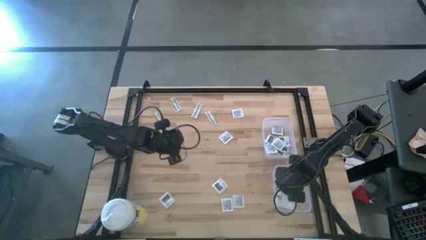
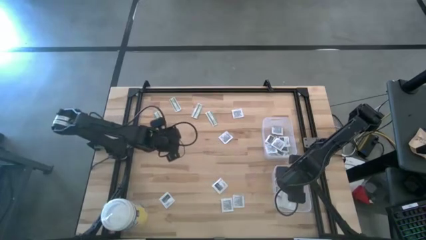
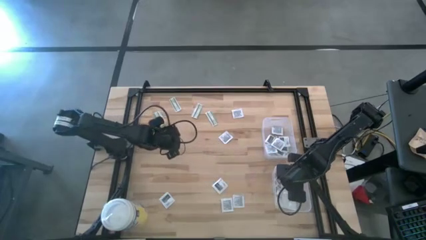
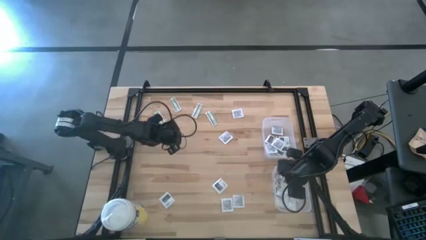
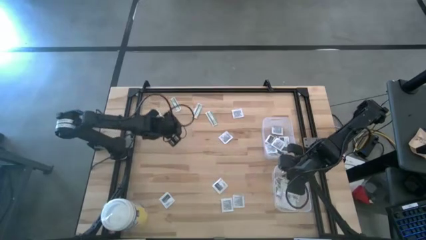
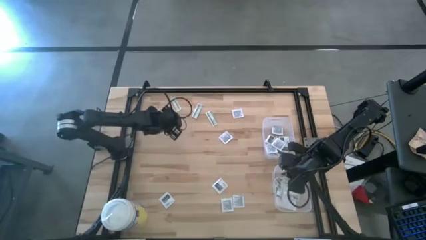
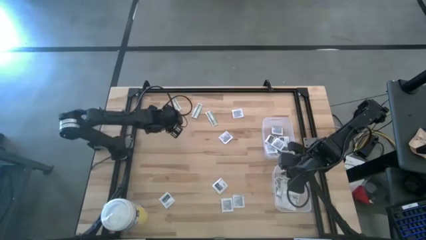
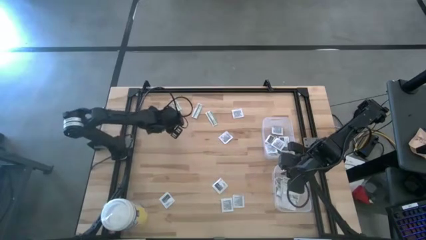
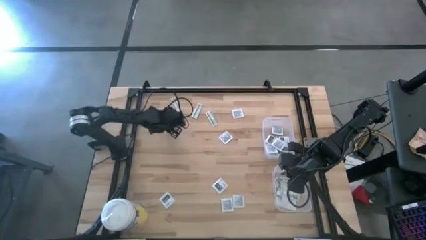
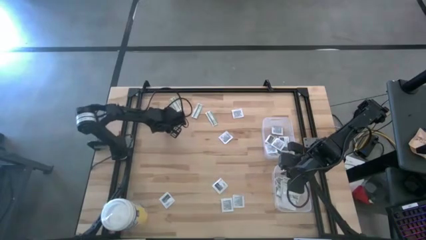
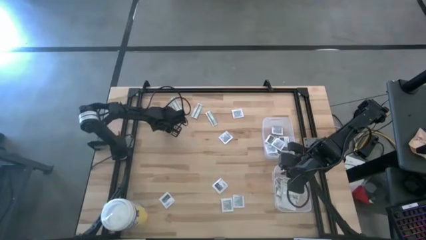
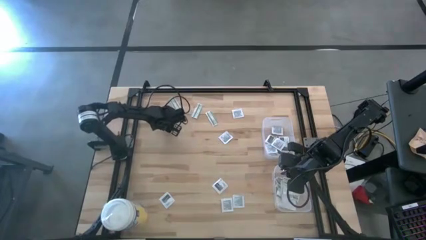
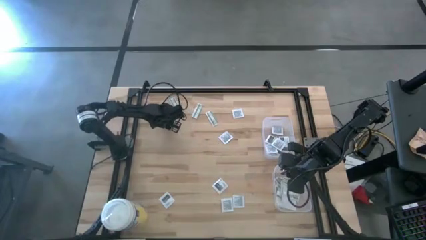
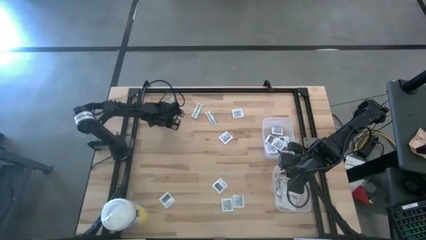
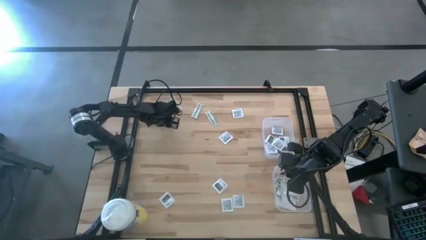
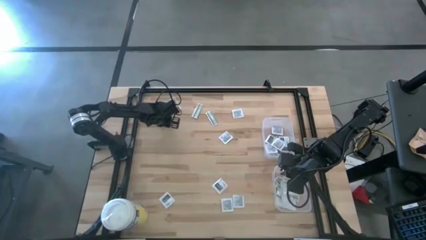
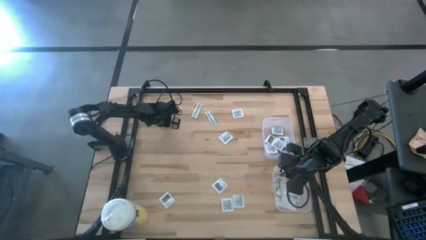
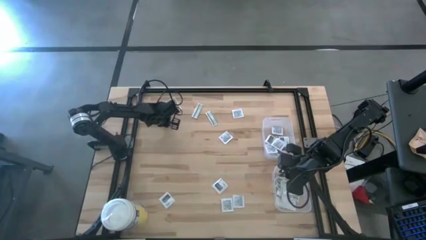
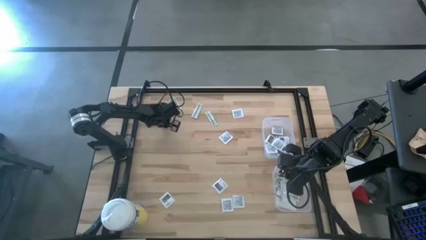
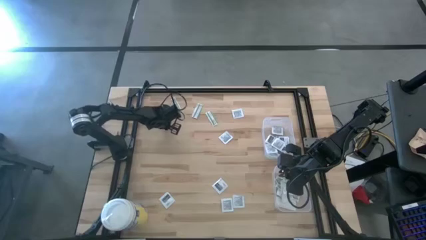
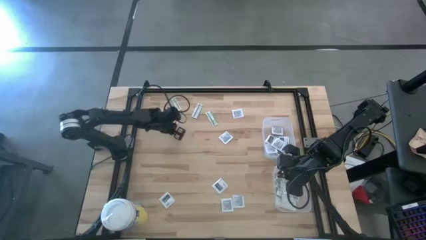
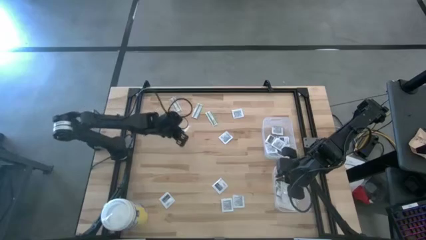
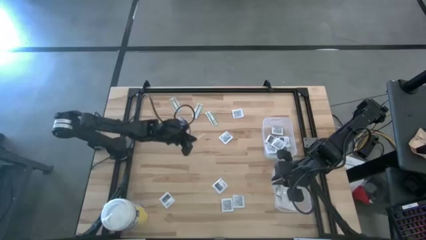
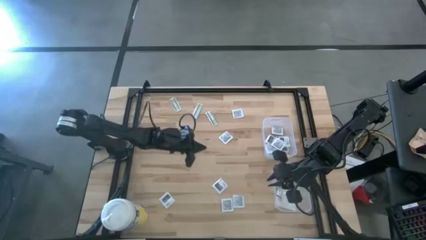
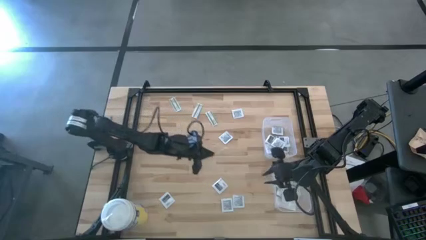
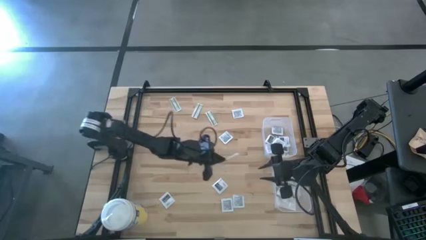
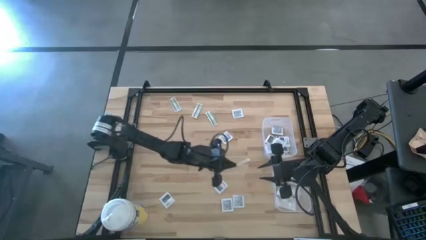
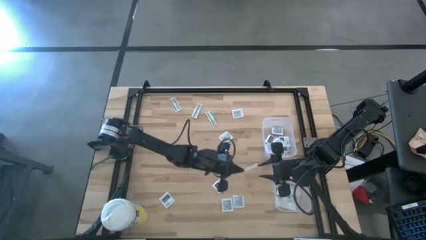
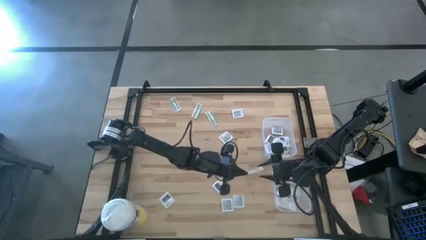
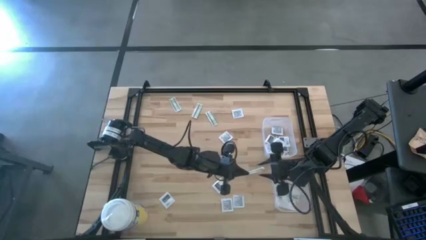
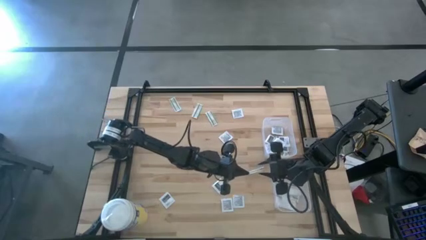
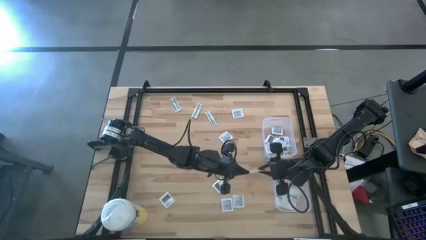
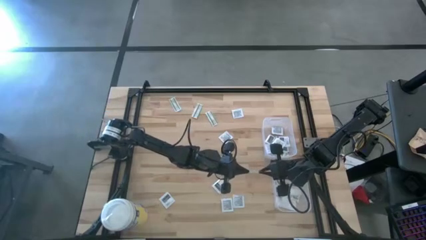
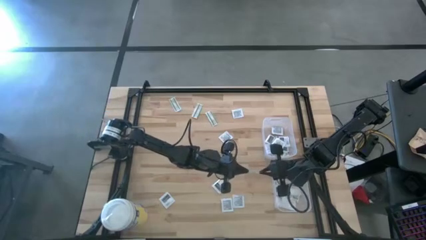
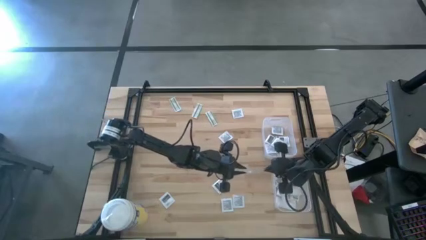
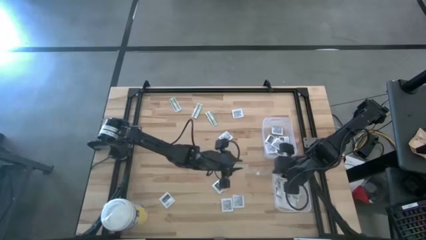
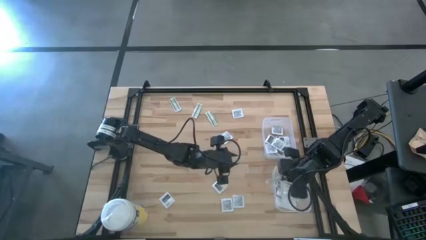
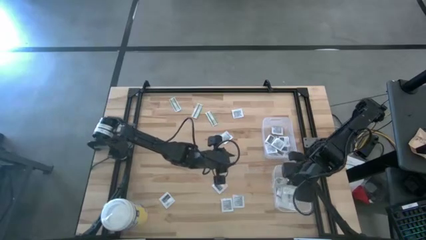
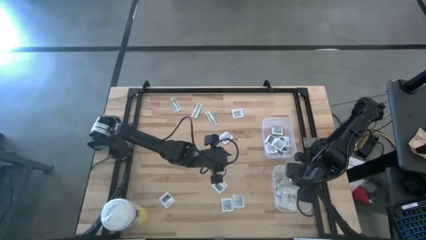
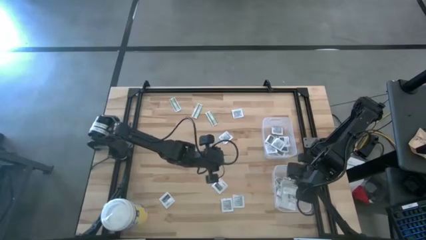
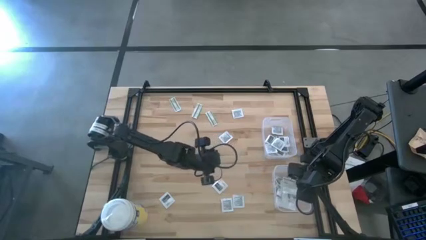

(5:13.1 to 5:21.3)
Task: Pick & Place First Aid Supplies
Put the bandage pack into the bottom bin

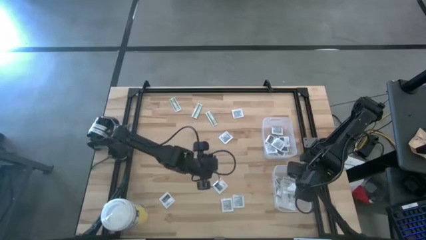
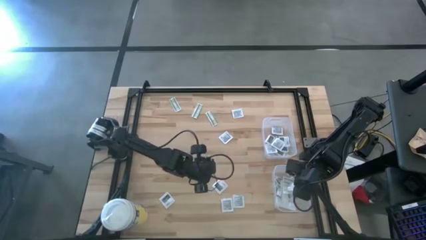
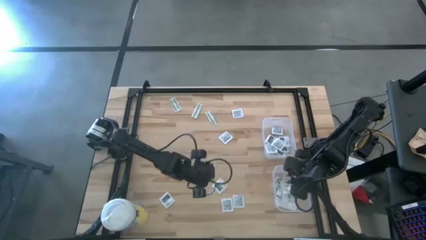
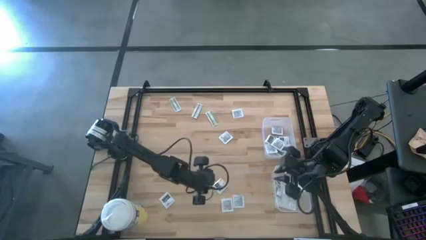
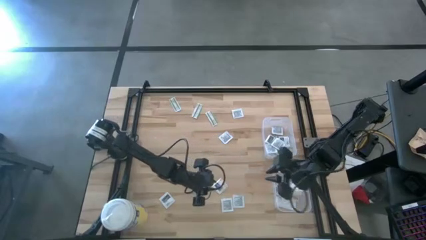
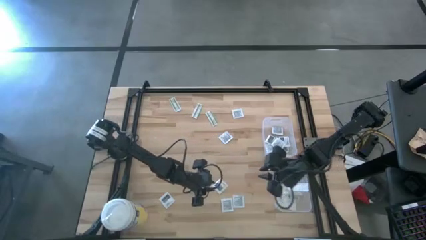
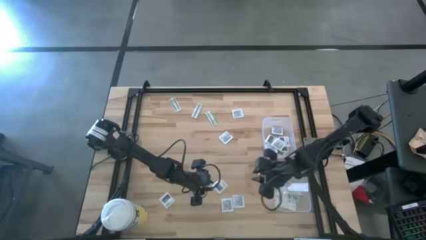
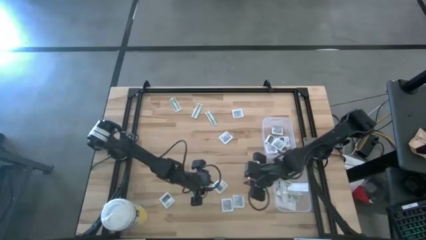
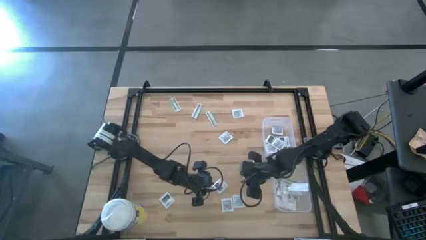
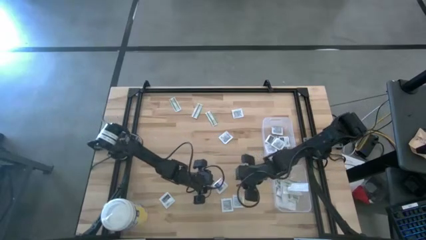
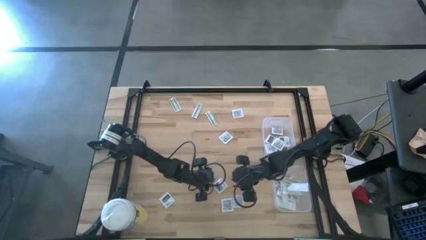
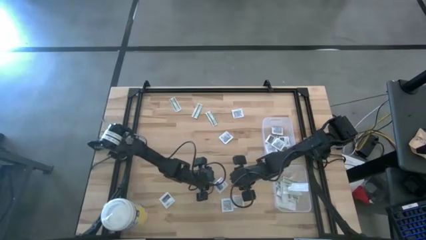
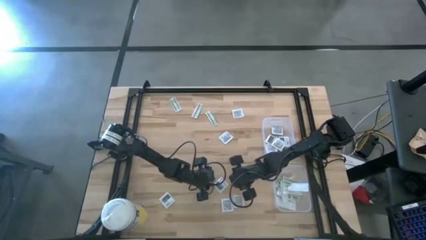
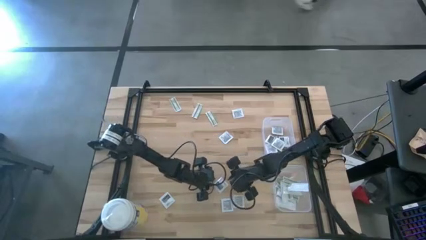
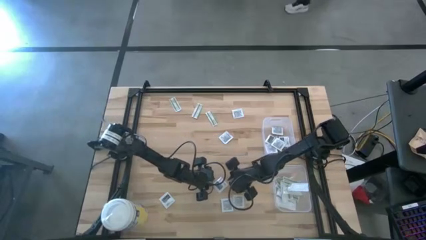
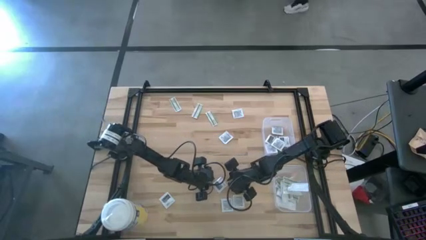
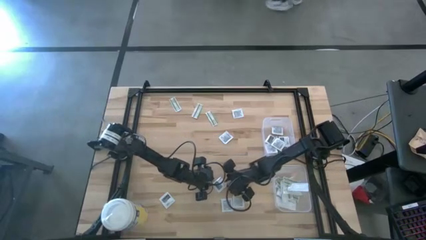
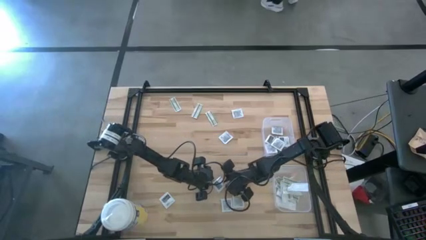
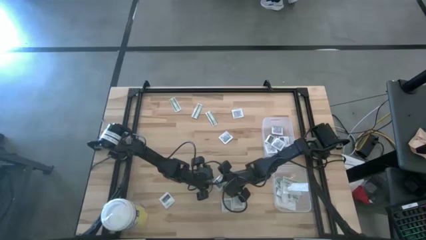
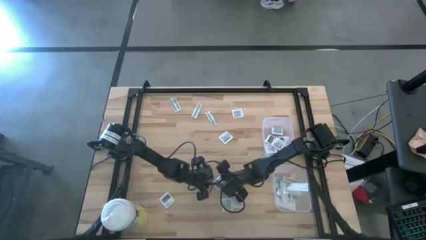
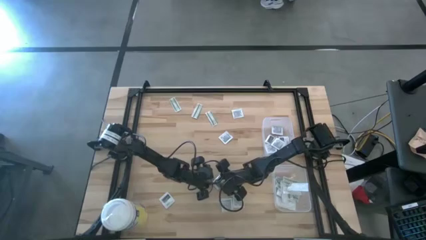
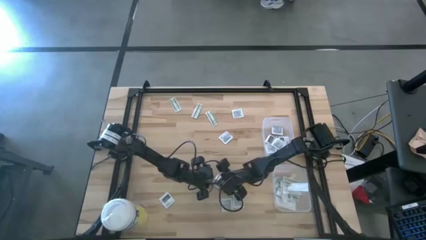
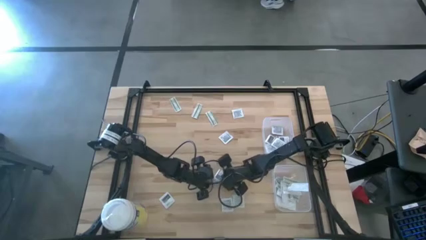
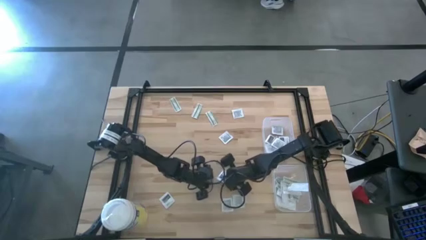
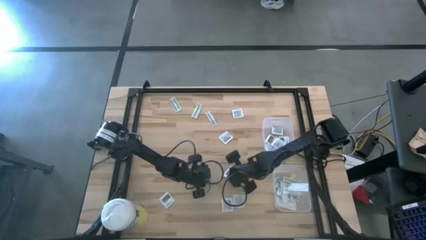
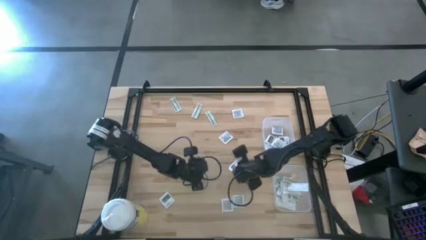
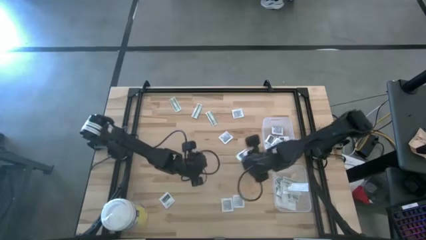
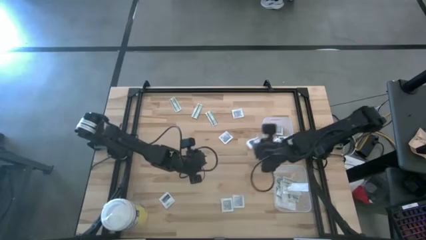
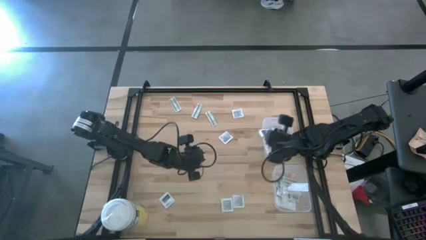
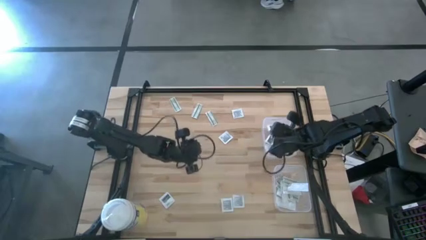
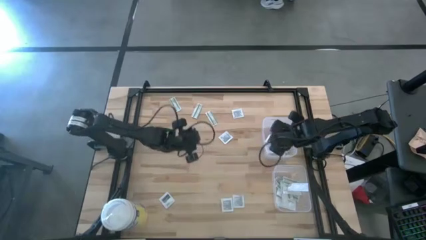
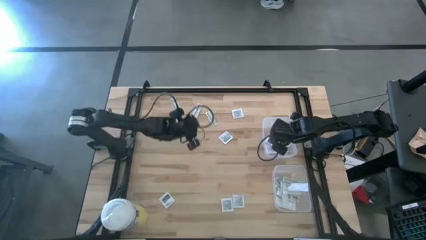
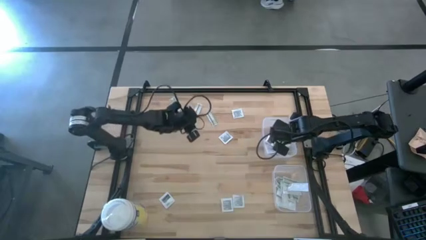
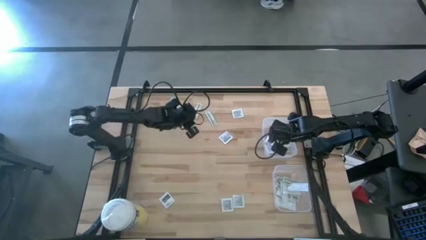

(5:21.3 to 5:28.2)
Put the towelette pack into the top bin

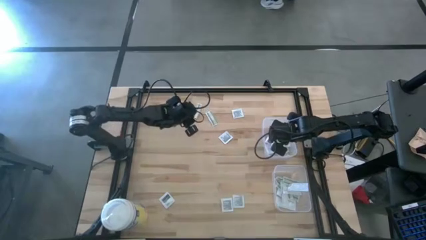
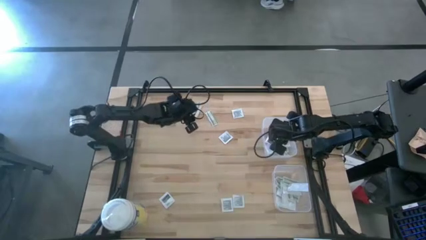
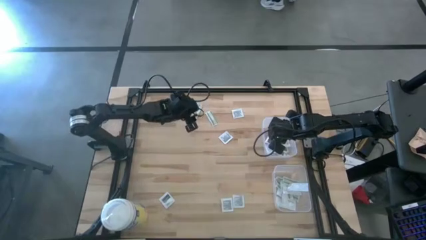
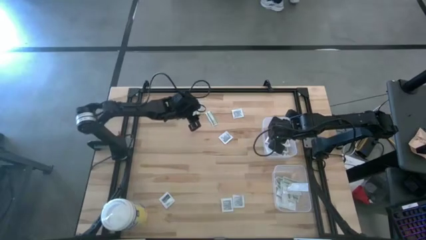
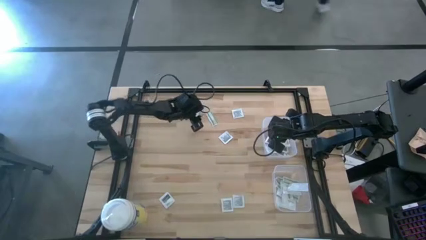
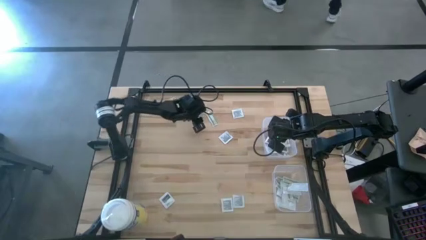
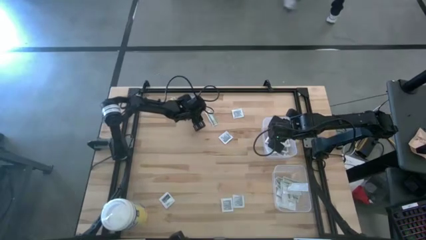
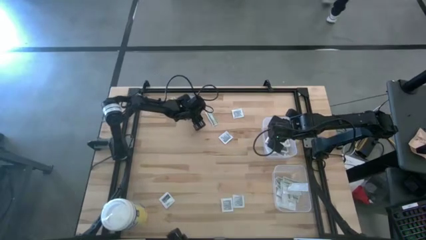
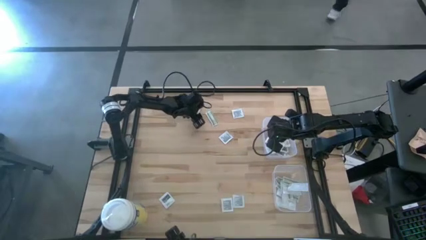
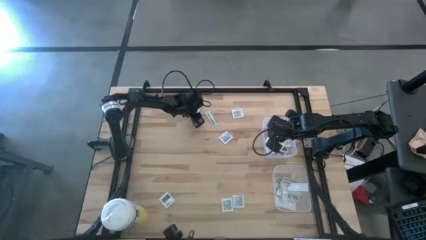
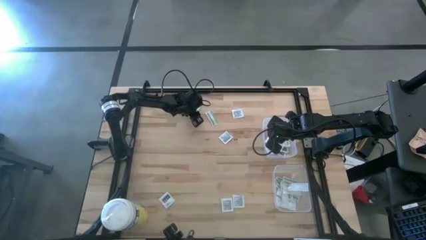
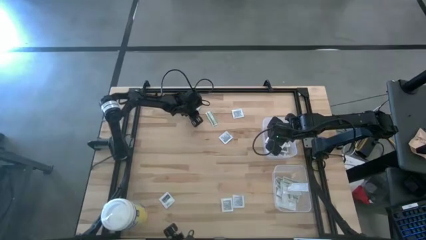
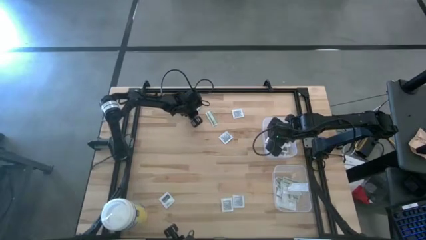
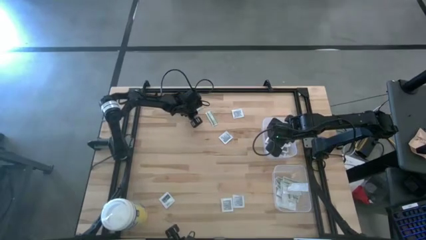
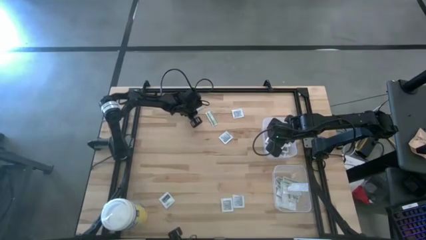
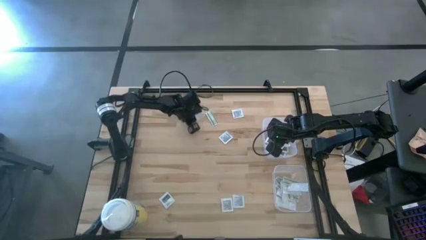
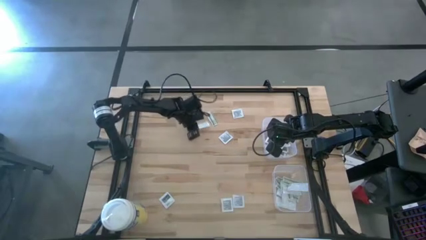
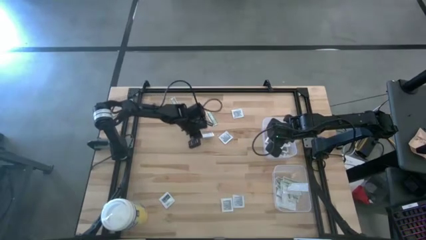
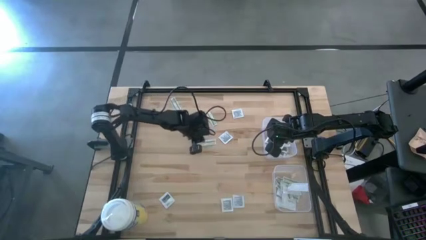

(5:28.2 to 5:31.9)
Put the middle bandage pack into the bottom bin
